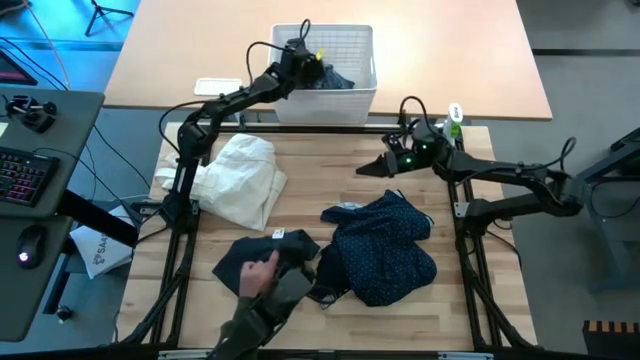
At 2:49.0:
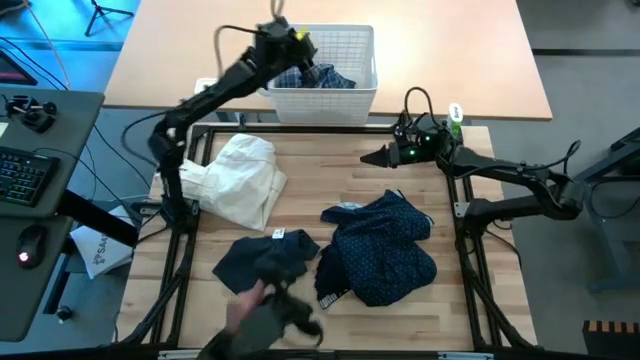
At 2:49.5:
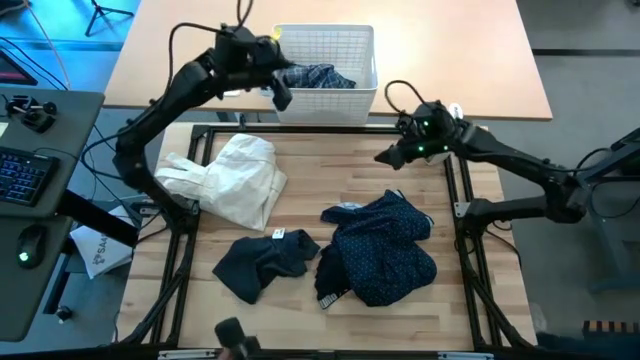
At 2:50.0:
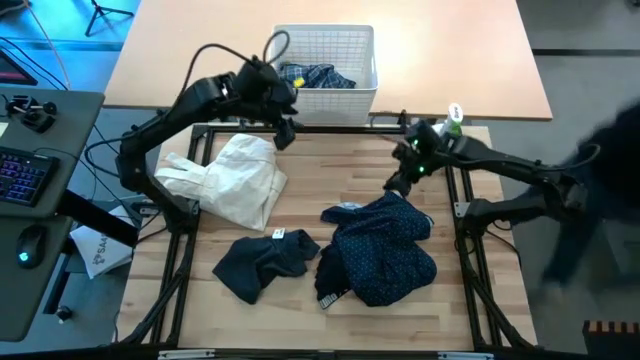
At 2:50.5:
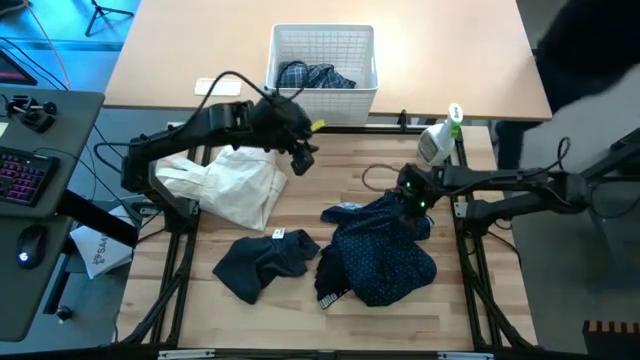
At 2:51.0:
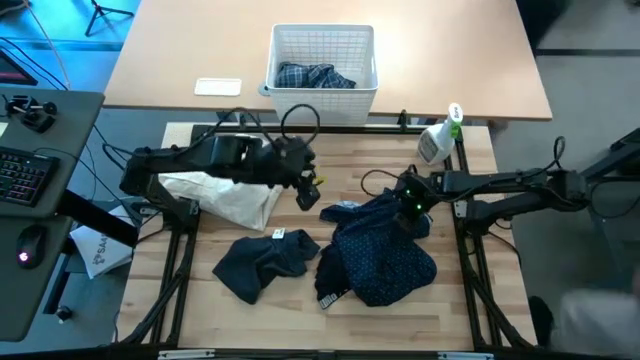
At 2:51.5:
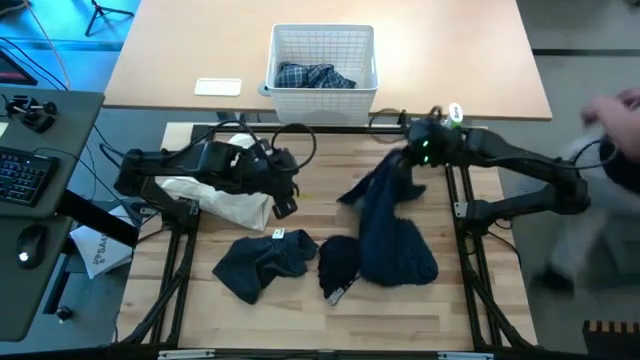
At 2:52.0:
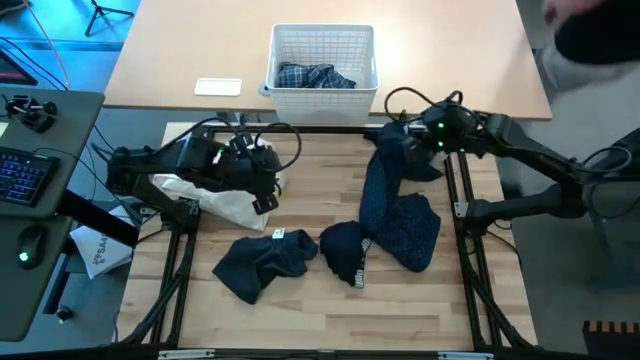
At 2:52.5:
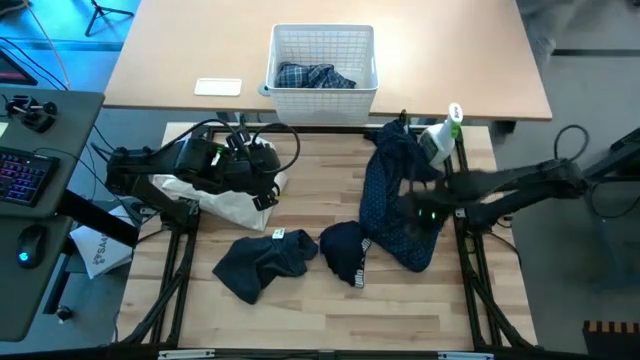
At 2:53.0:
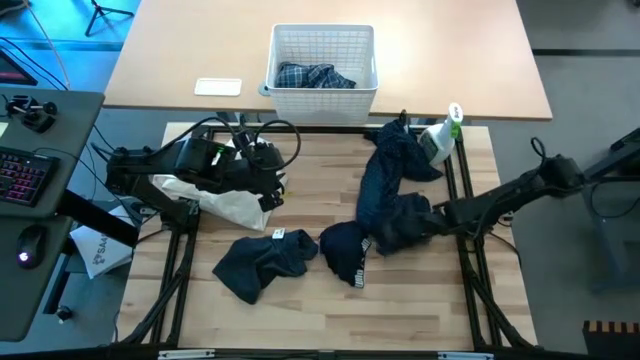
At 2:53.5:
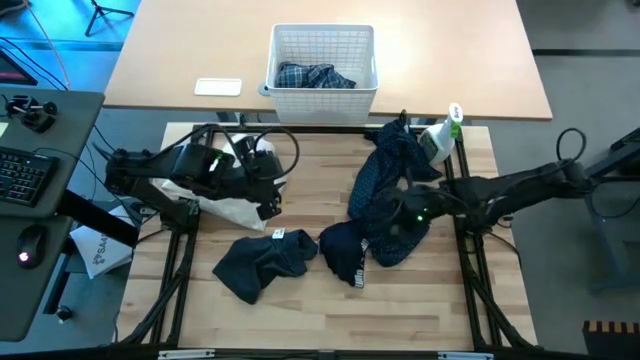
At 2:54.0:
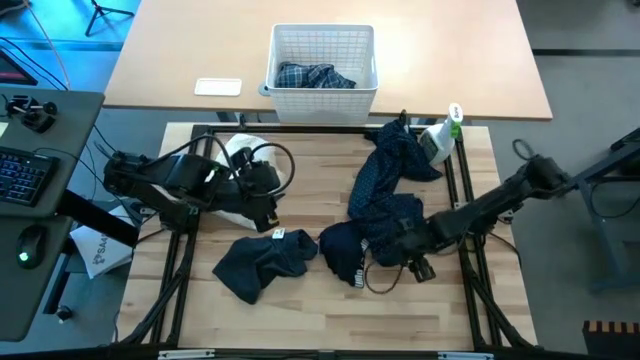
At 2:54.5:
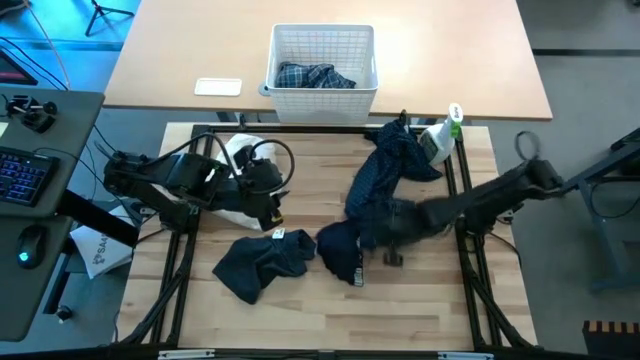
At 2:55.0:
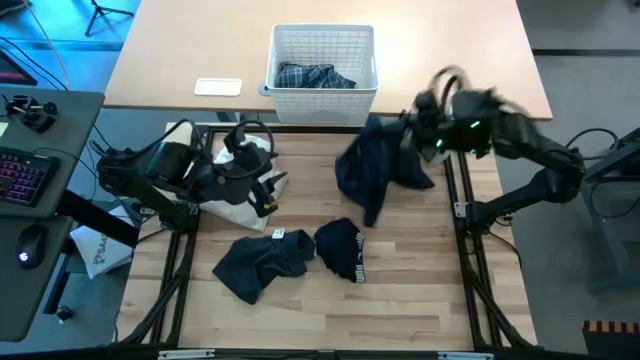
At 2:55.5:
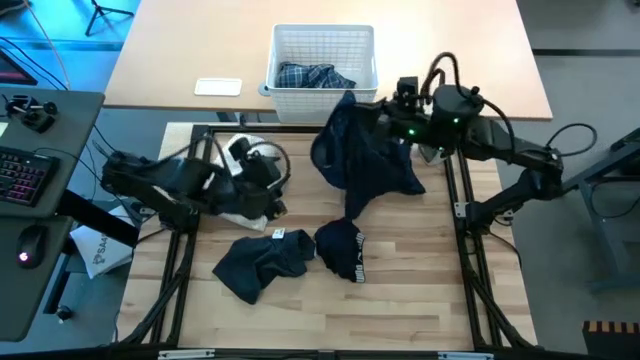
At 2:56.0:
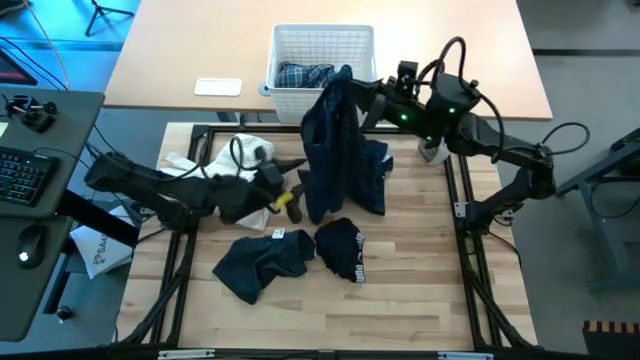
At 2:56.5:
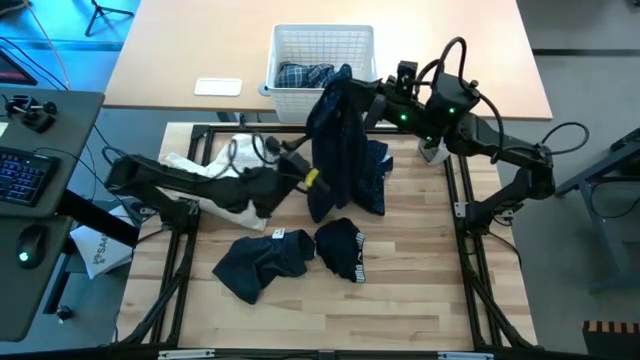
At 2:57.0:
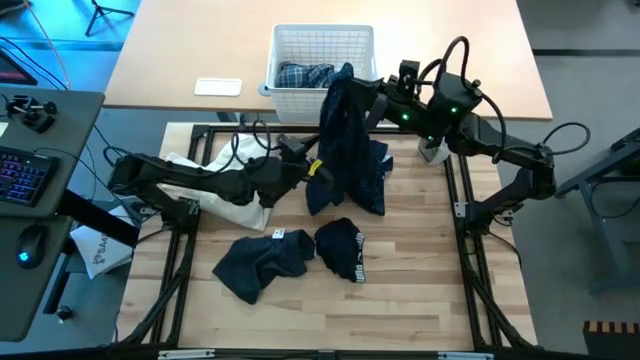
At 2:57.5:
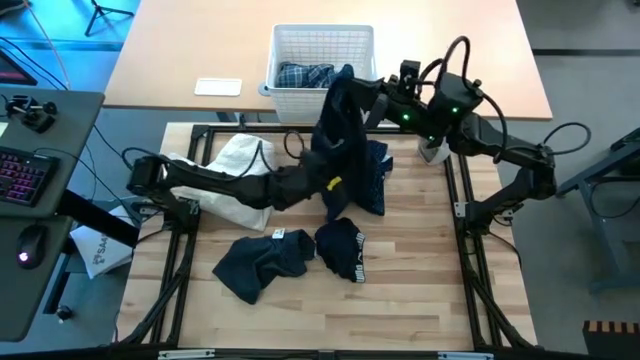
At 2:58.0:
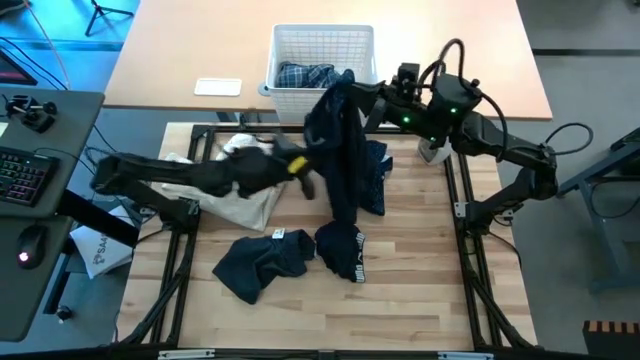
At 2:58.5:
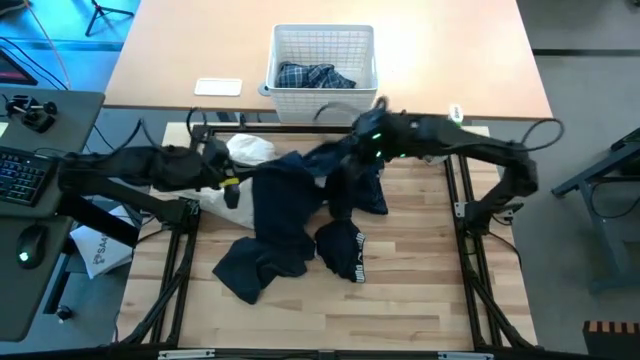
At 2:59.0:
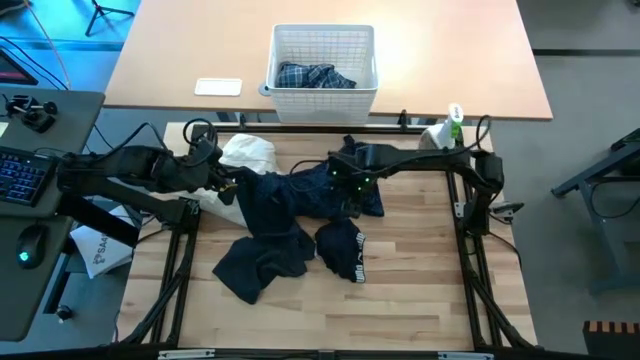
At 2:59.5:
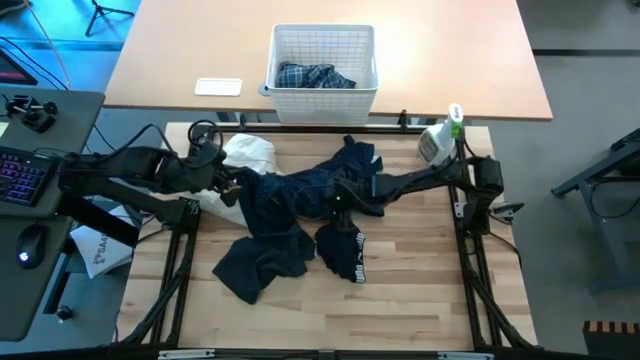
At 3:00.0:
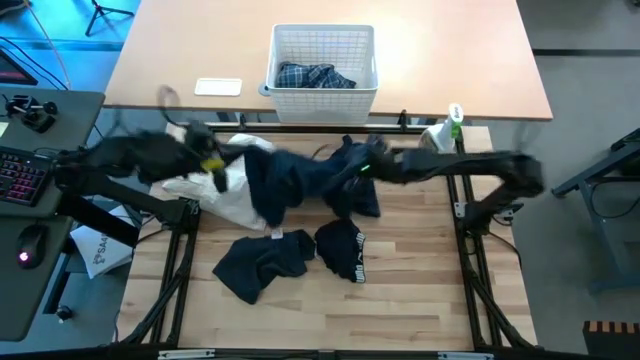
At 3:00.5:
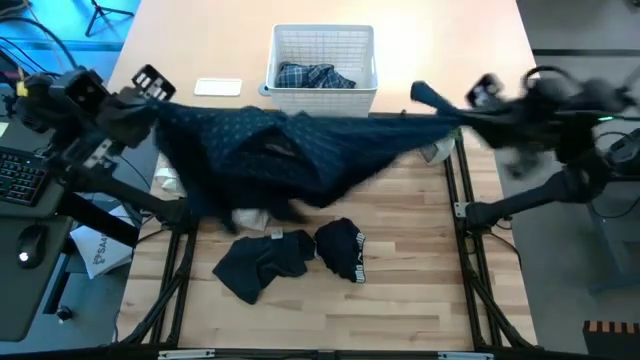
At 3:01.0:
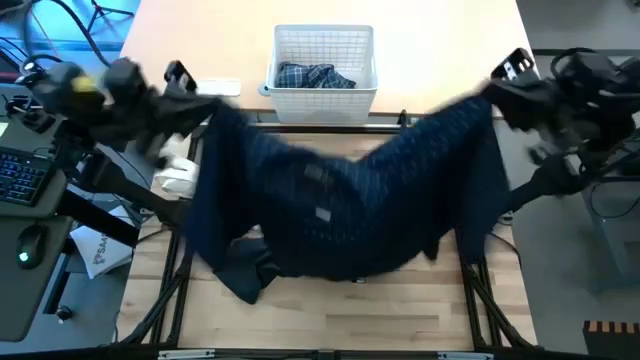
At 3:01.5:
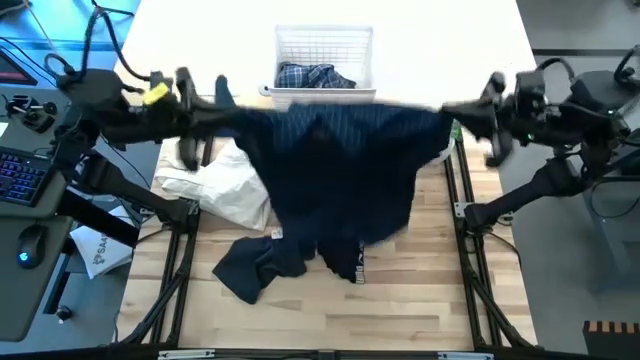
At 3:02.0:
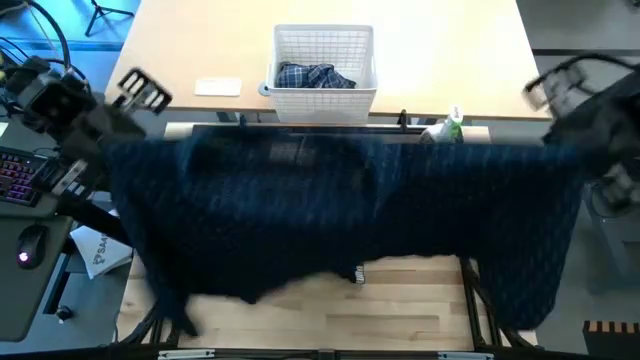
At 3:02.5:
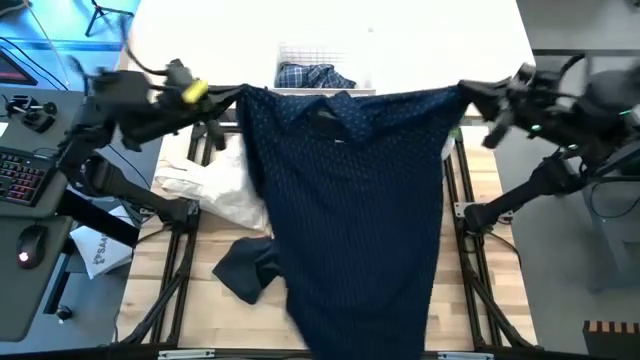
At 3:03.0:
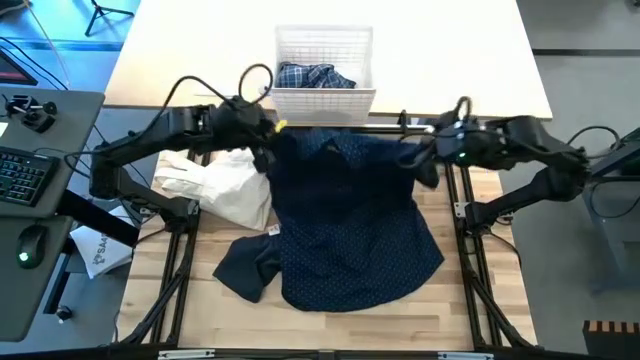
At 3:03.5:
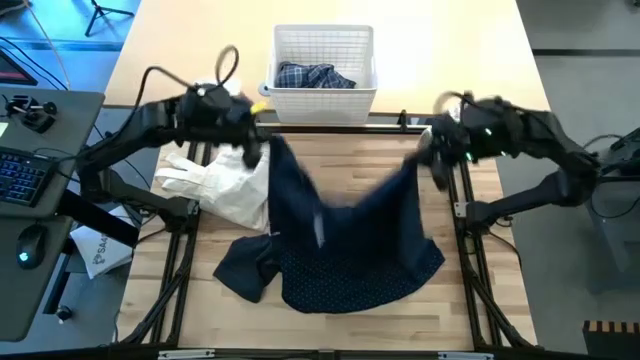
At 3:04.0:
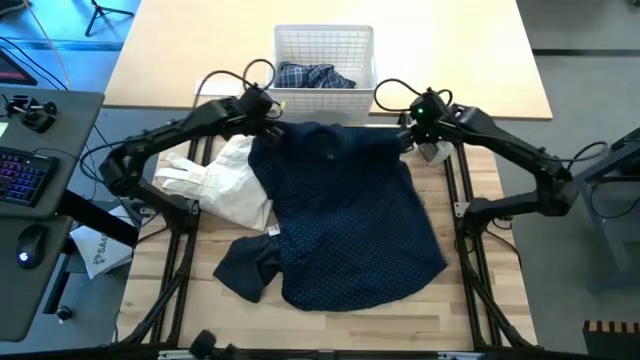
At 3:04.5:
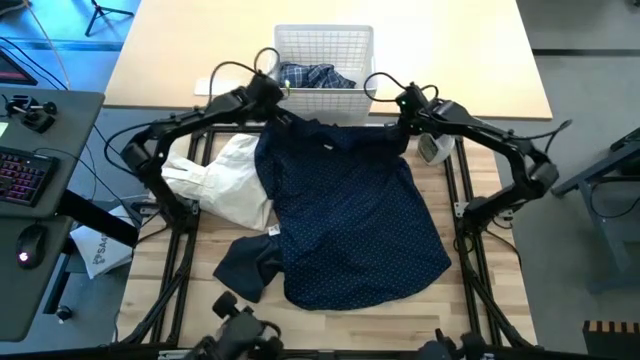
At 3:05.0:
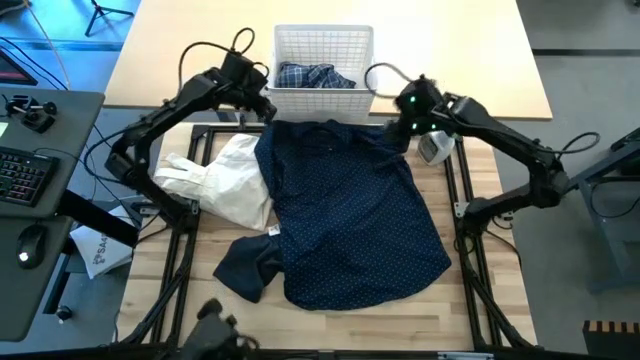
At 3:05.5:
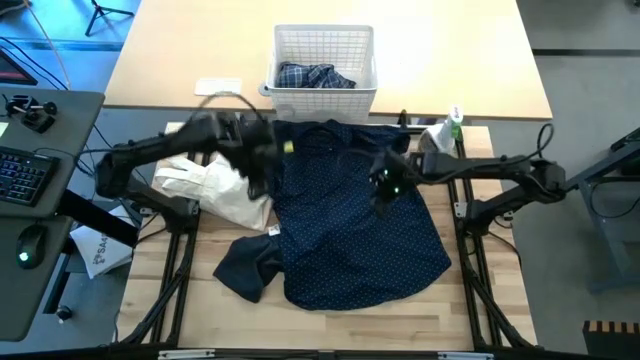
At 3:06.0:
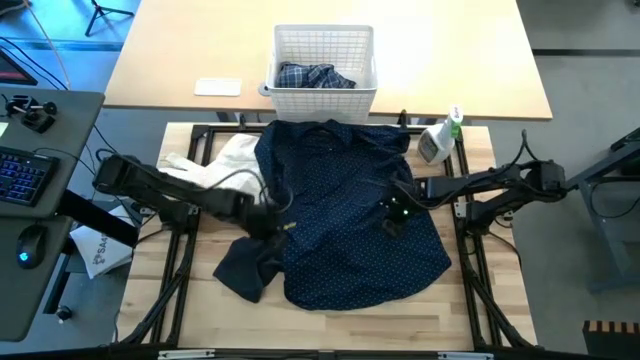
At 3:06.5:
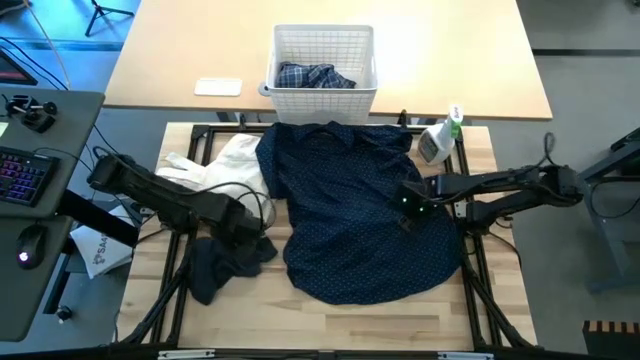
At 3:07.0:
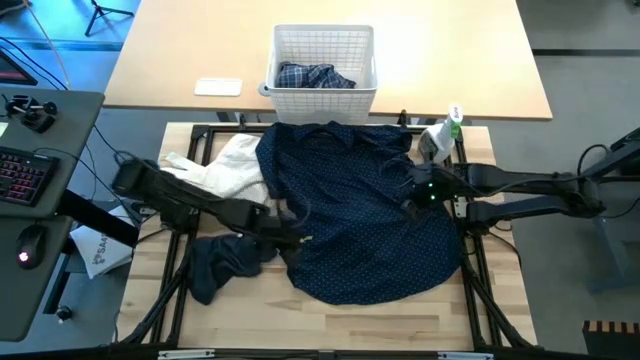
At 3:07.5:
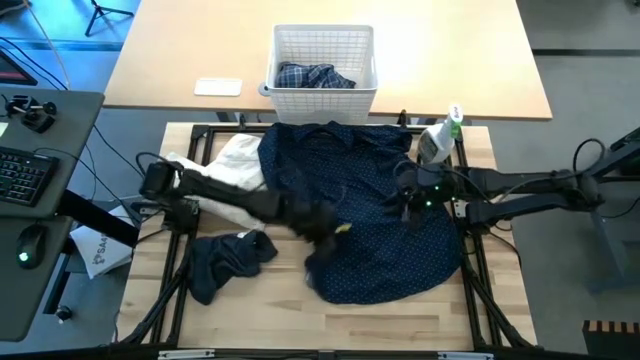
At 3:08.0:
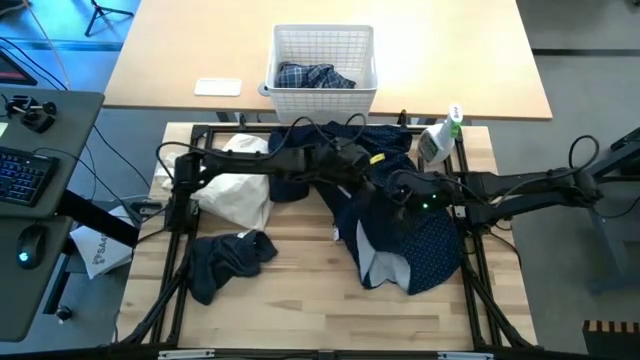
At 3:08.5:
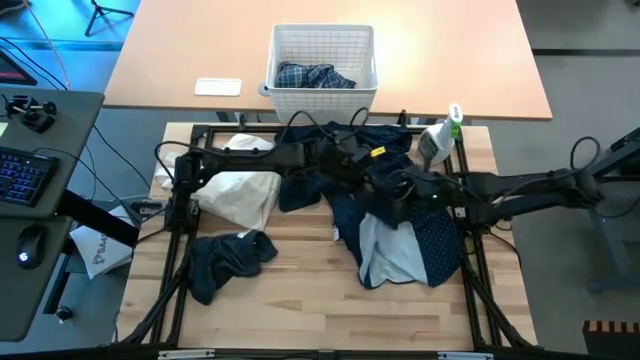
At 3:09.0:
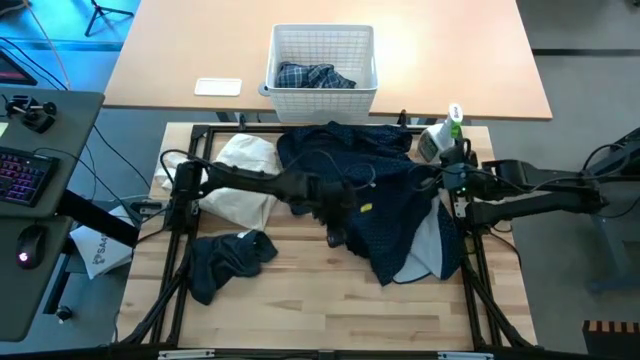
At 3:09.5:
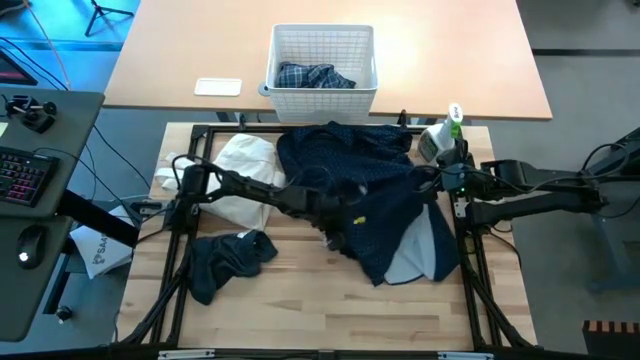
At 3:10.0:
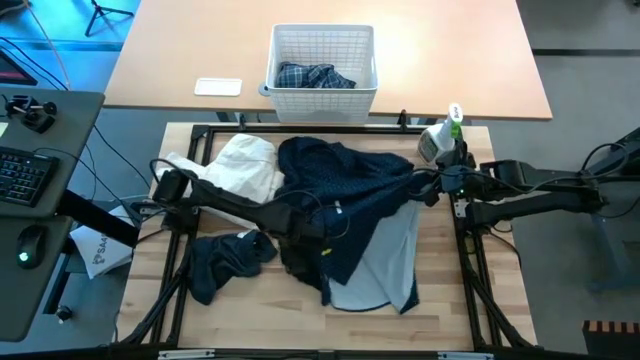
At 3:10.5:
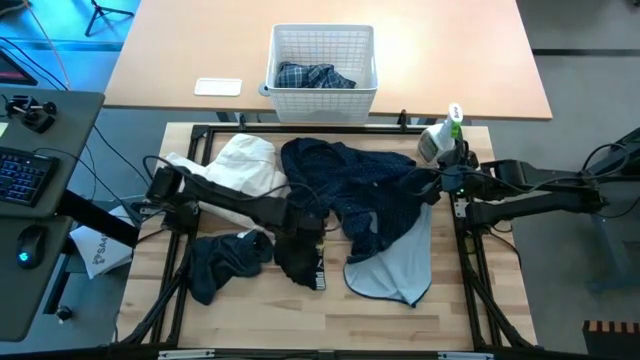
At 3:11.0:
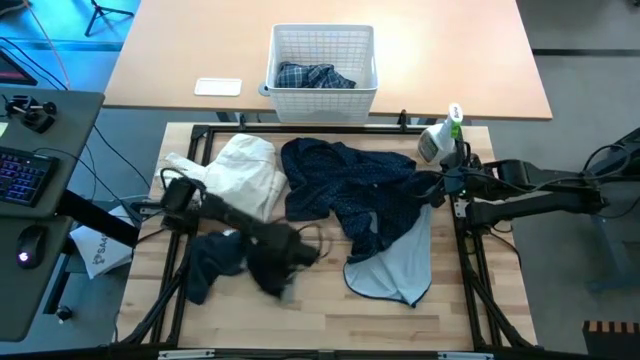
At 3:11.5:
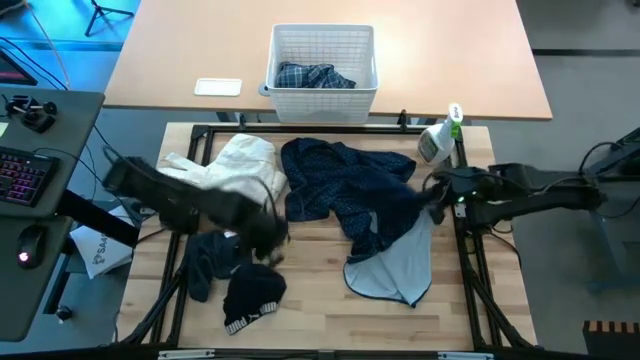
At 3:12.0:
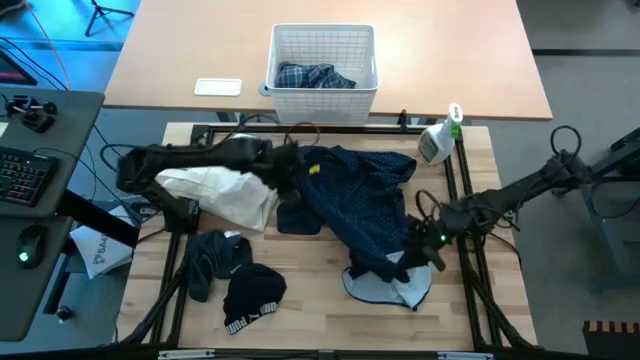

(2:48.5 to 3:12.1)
Task: Fold laundry
Fold the navy blue polo shirt
